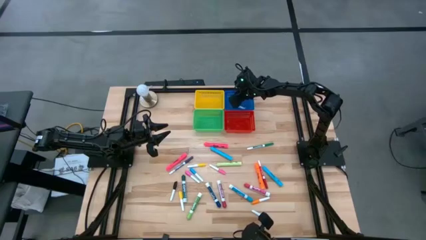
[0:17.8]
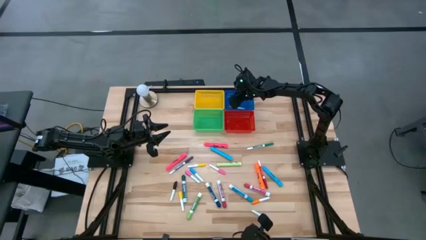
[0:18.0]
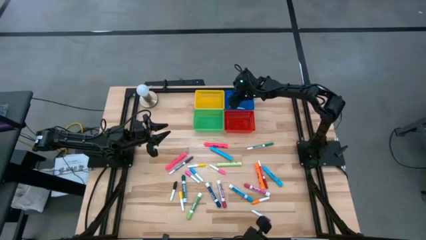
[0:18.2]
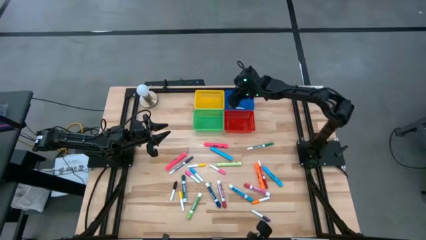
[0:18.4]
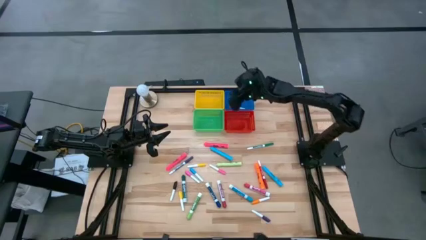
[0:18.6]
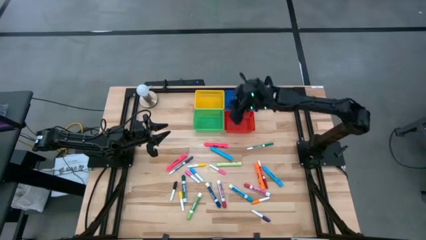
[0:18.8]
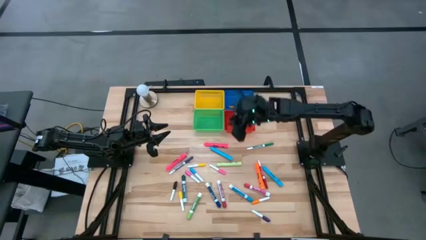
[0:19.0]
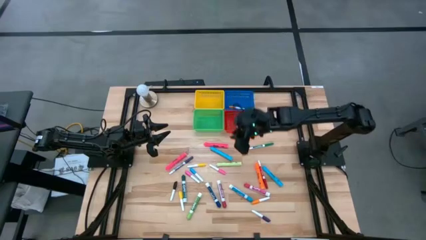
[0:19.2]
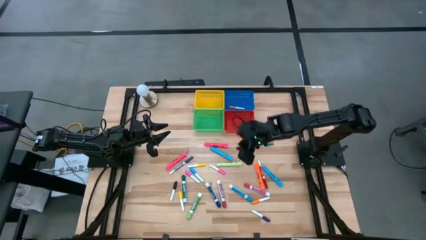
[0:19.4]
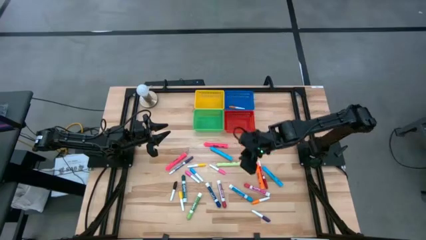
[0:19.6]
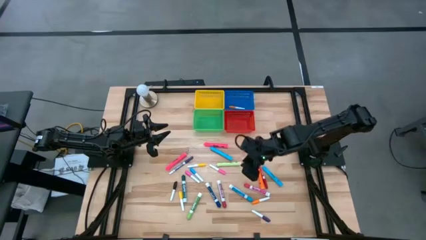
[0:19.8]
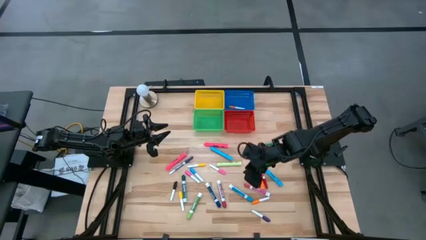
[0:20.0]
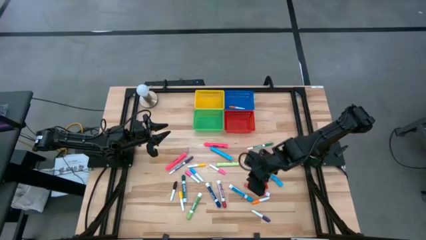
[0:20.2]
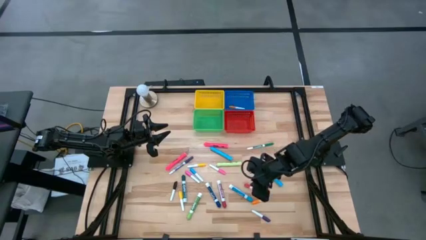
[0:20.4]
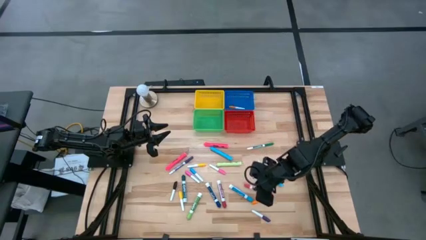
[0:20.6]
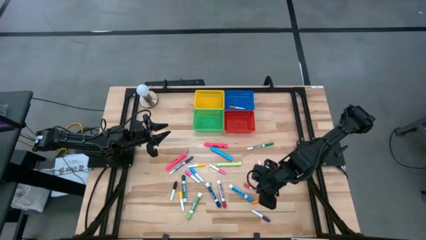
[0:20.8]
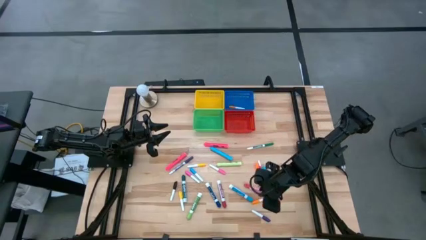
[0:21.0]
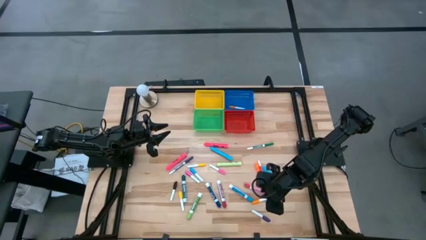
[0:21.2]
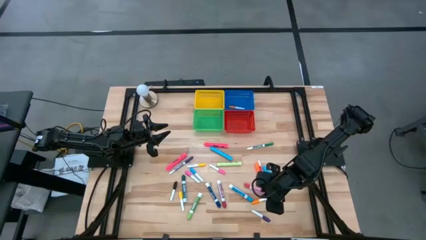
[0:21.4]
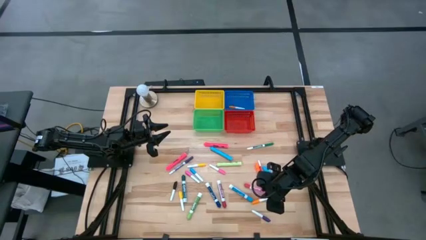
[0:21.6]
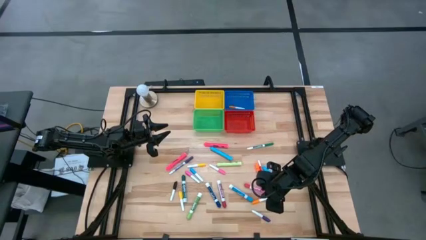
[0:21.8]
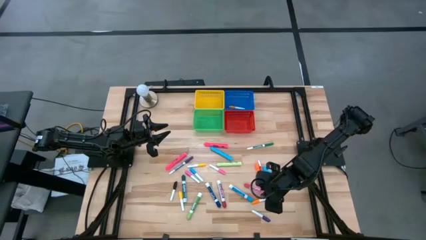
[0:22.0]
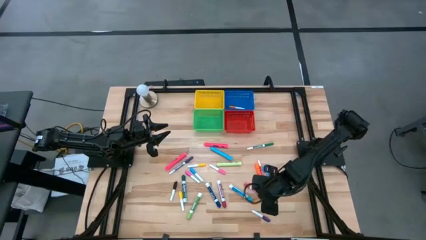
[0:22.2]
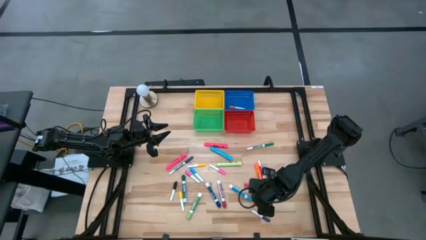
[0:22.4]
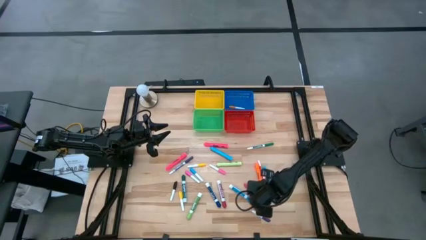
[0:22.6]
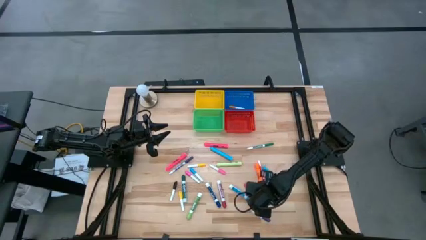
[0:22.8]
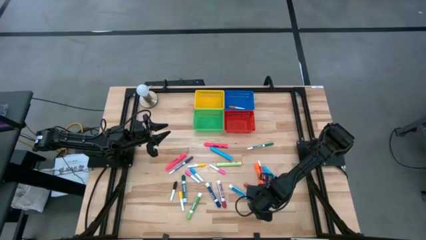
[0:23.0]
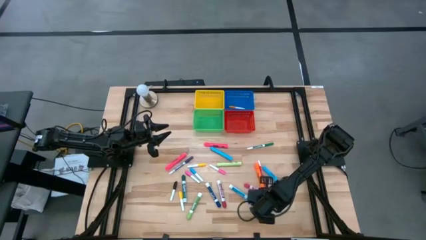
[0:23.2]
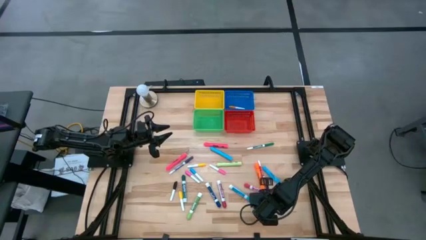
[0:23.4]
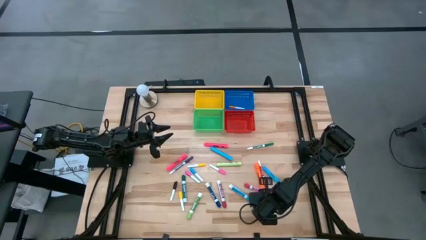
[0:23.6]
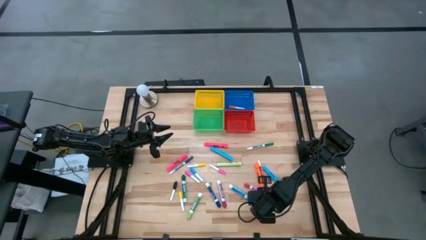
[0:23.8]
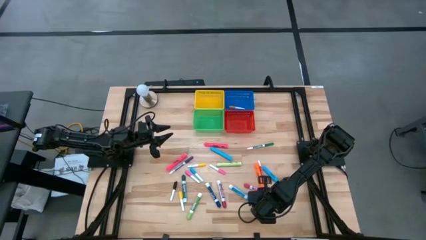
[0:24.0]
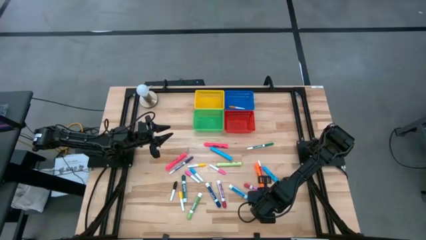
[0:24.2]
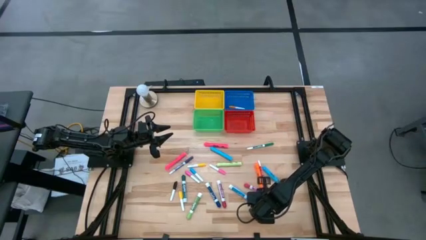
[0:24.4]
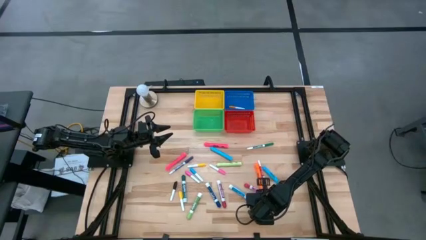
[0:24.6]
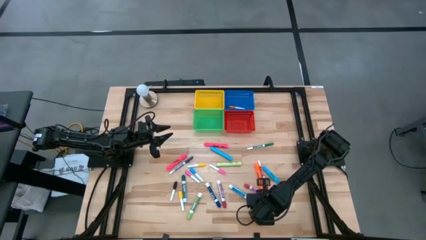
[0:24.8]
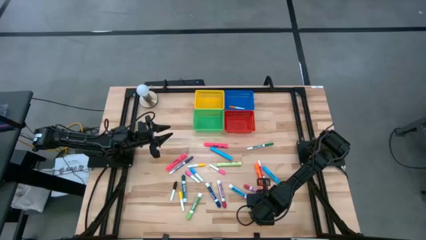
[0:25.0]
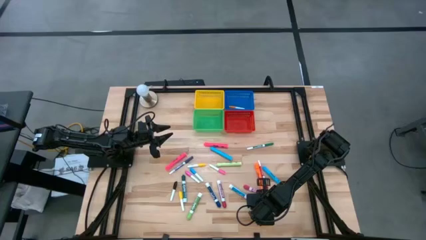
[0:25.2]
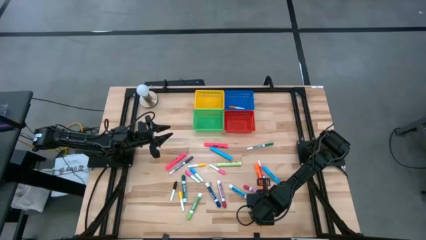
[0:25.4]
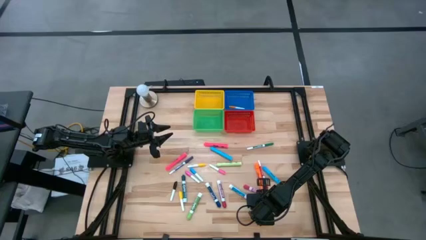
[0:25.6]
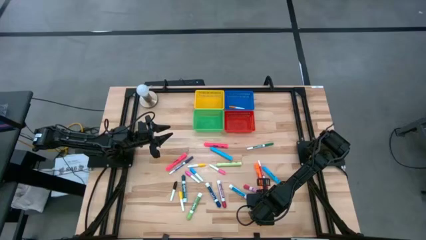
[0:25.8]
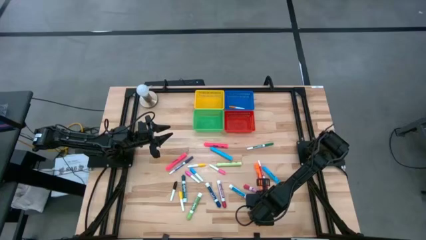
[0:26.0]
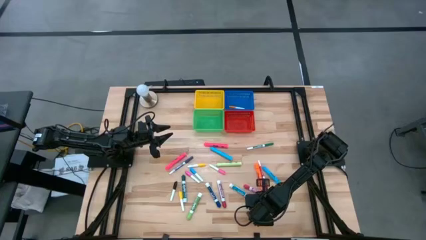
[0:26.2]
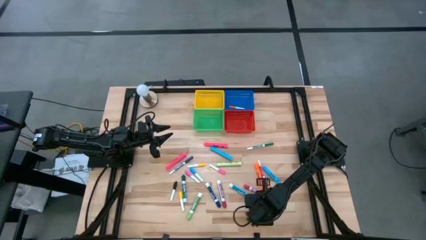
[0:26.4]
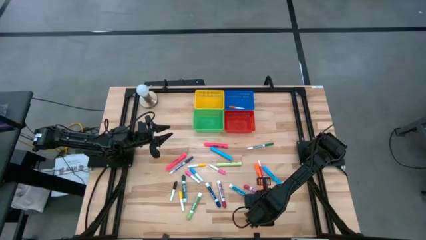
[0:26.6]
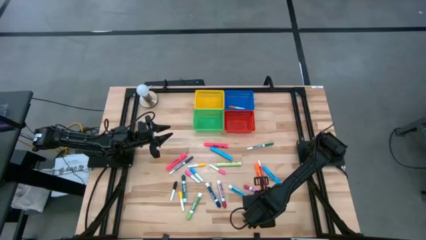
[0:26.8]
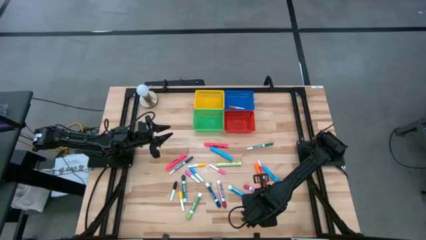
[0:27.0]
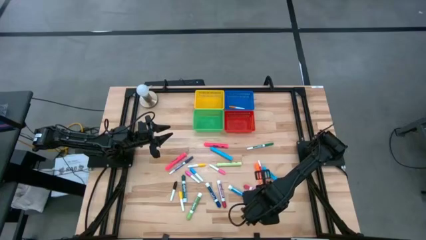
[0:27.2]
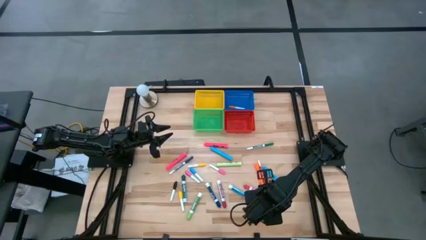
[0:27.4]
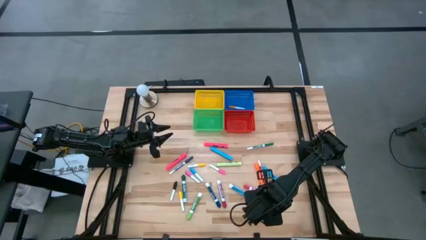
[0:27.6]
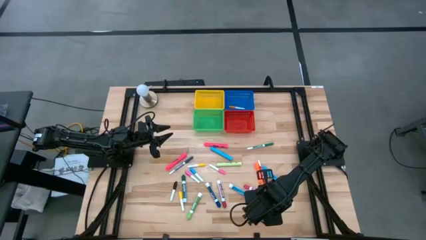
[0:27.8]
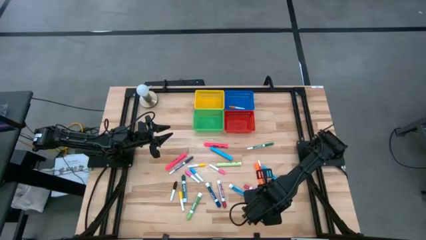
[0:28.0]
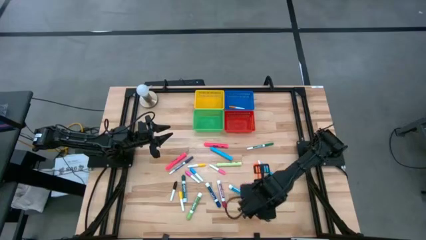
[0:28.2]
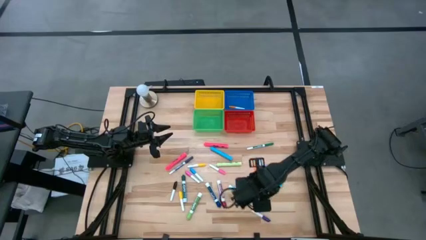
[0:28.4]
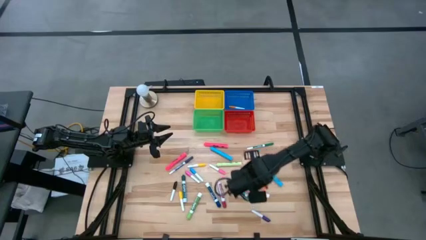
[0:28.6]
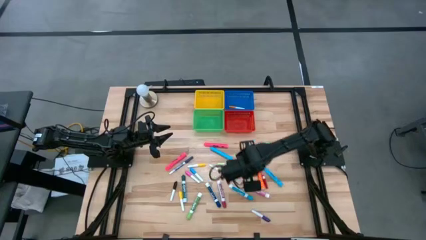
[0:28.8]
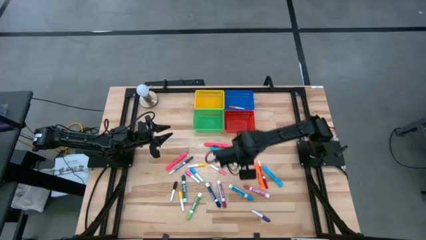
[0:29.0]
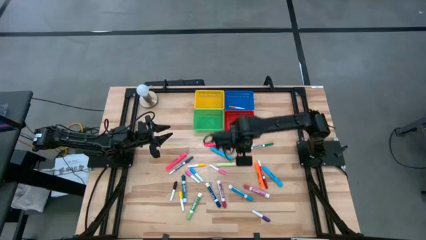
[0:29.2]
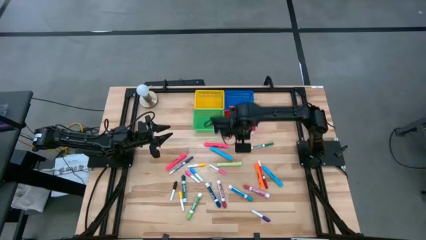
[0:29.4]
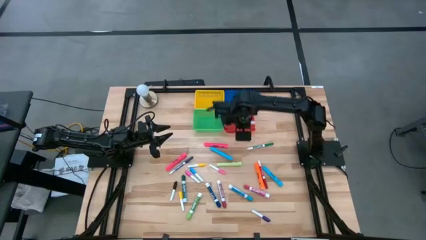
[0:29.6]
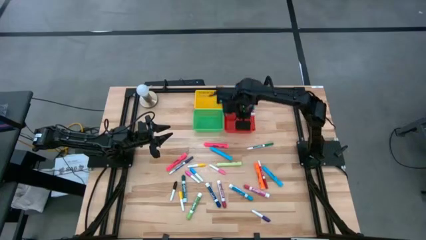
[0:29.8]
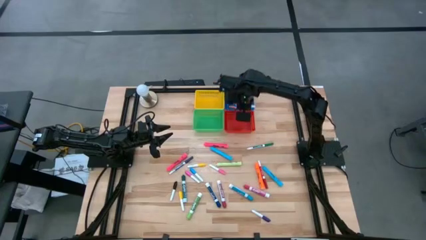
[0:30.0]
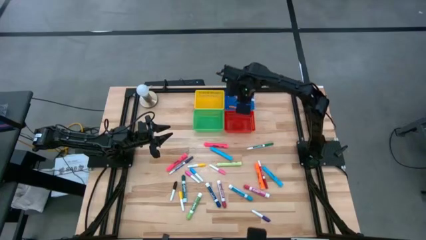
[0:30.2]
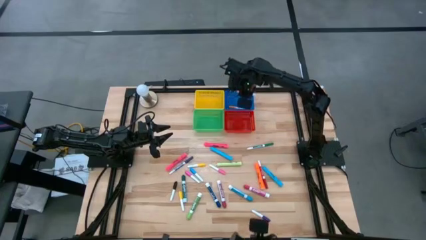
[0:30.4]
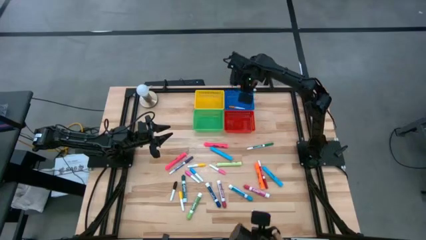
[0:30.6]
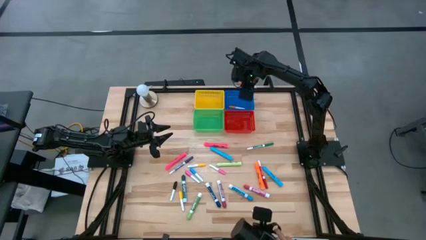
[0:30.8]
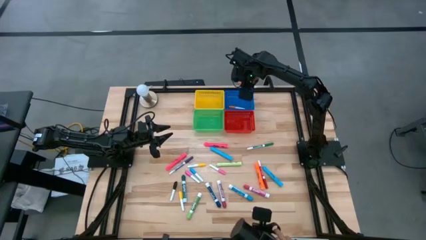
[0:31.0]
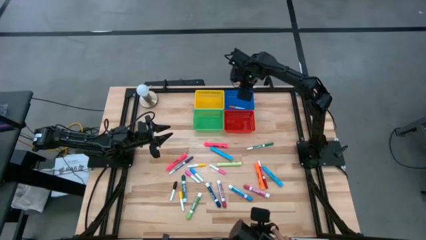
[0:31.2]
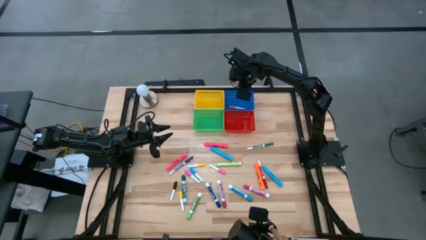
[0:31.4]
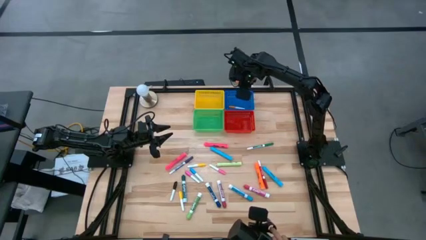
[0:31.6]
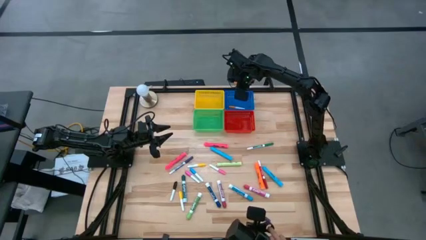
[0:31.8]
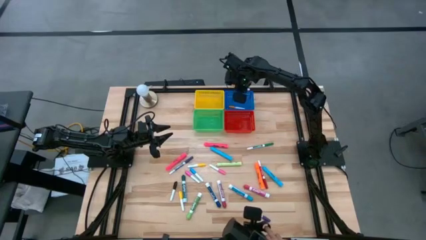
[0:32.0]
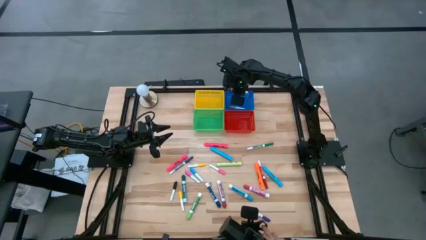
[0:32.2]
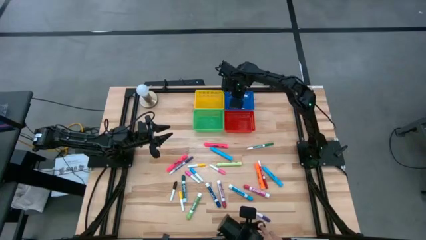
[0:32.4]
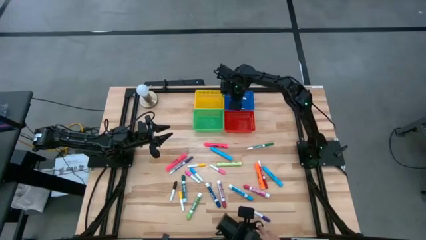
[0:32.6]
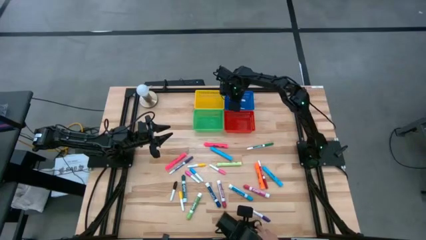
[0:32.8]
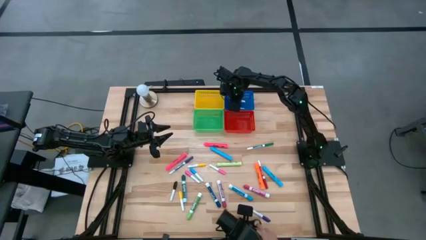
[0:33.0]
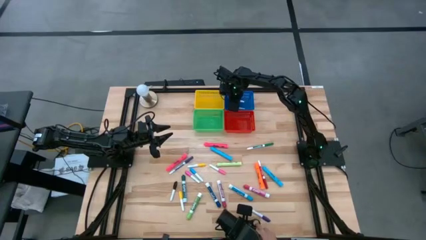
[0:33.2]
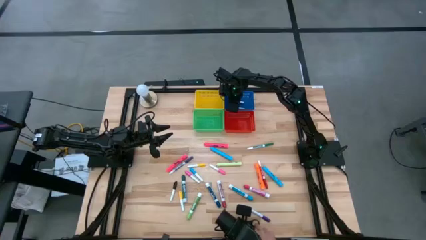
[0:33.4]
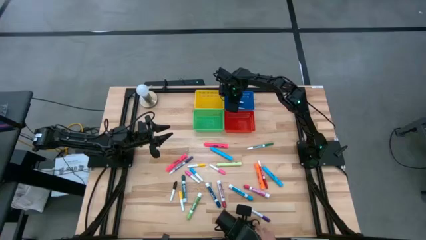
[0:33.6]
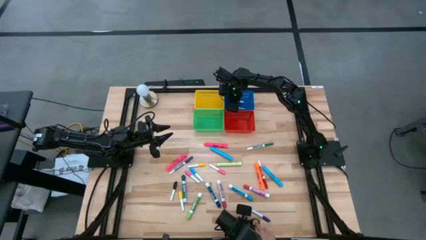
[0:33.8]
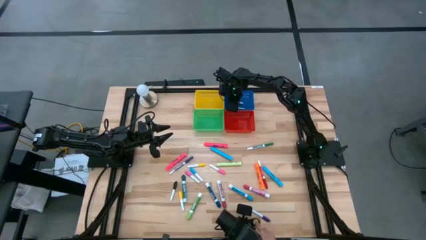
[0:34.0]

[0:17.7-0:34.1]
Task: Pick & Place Markers
Put the small orange highlighter pen into the blue bin
